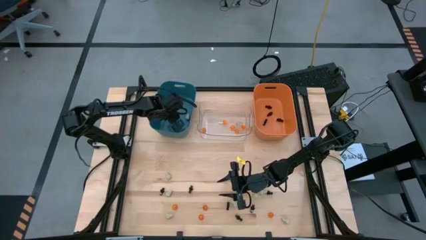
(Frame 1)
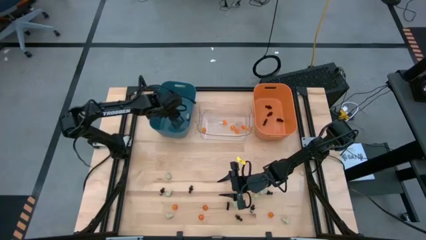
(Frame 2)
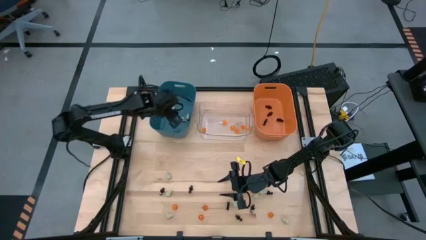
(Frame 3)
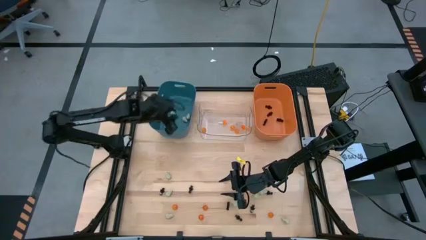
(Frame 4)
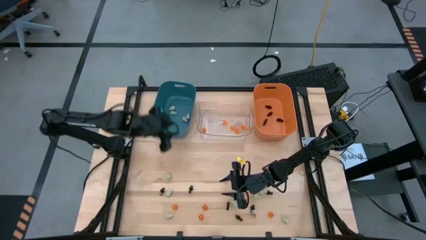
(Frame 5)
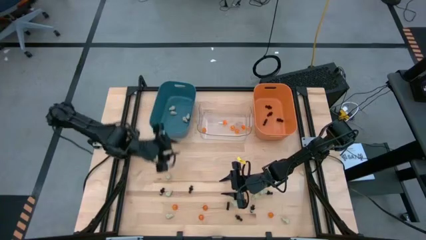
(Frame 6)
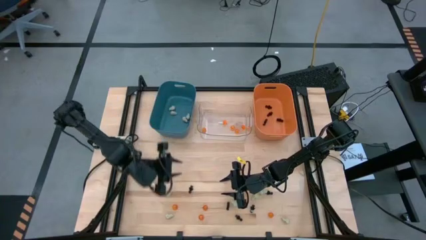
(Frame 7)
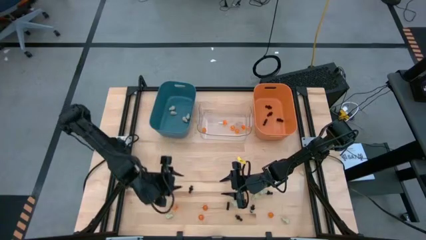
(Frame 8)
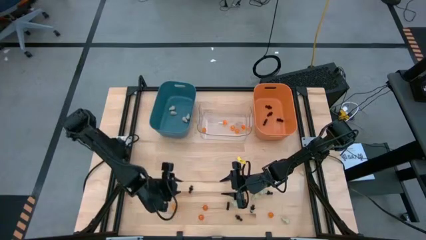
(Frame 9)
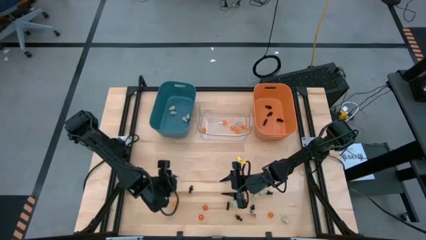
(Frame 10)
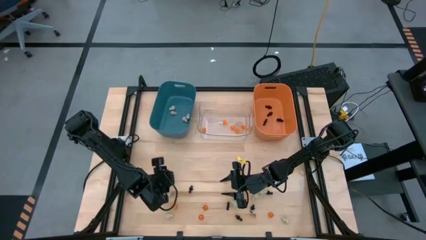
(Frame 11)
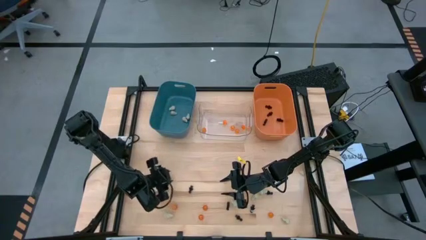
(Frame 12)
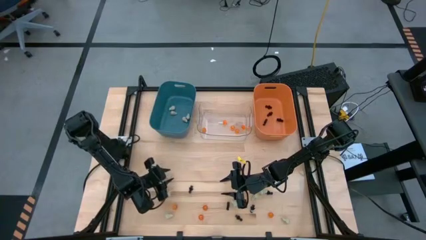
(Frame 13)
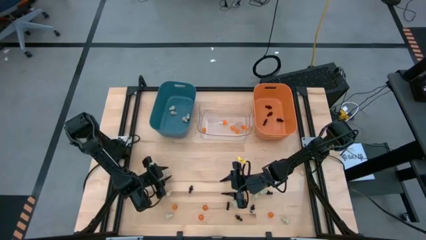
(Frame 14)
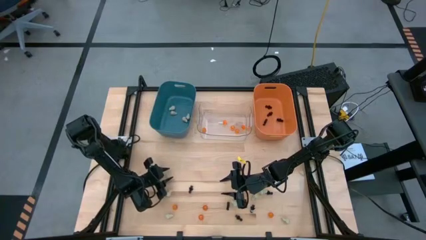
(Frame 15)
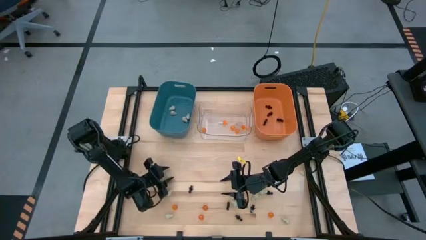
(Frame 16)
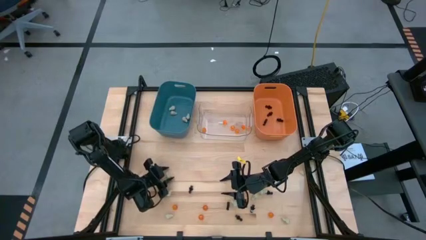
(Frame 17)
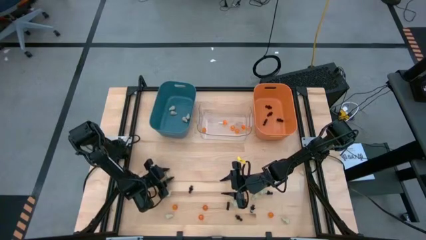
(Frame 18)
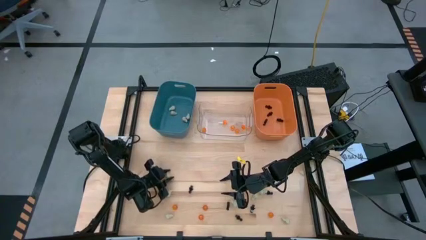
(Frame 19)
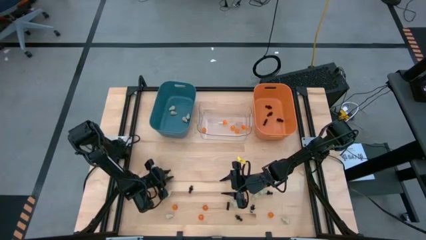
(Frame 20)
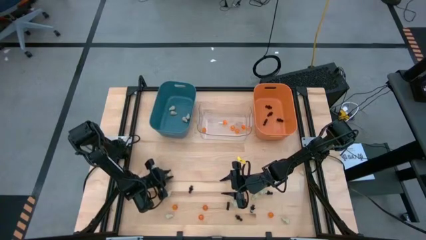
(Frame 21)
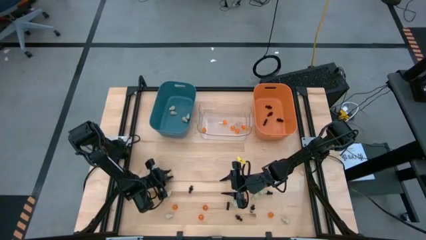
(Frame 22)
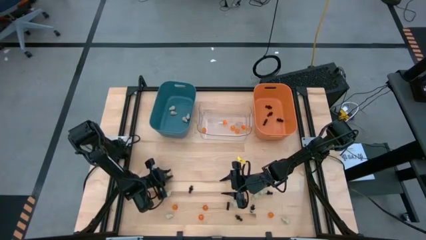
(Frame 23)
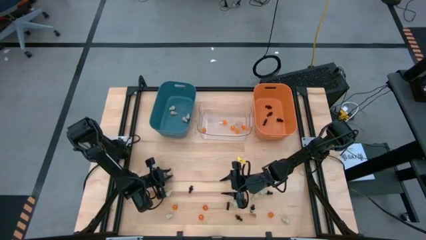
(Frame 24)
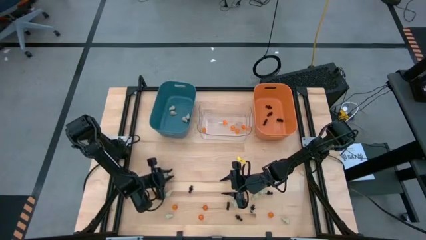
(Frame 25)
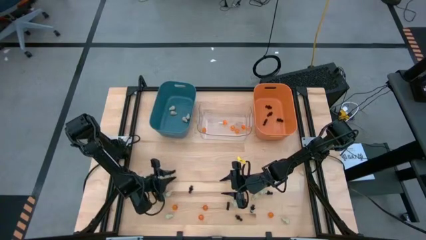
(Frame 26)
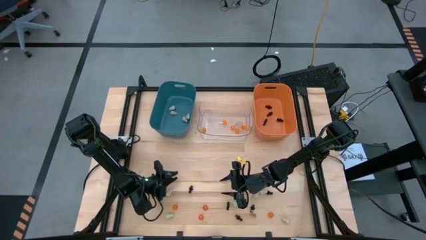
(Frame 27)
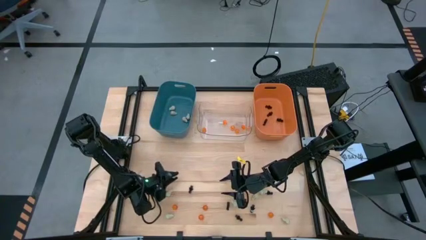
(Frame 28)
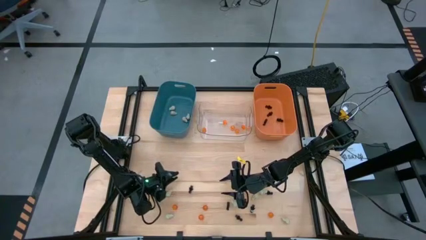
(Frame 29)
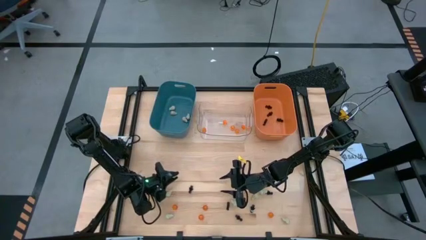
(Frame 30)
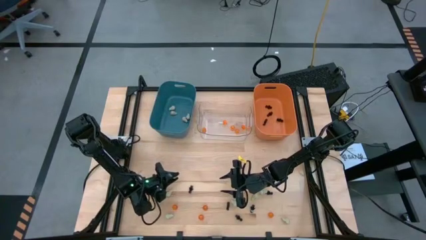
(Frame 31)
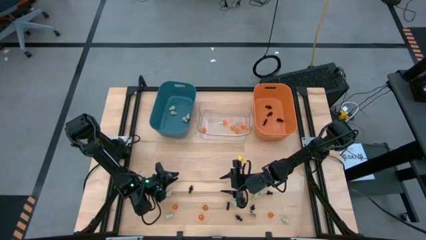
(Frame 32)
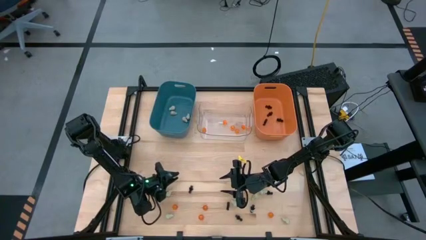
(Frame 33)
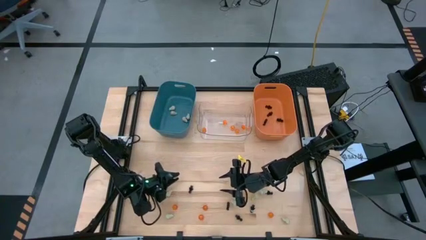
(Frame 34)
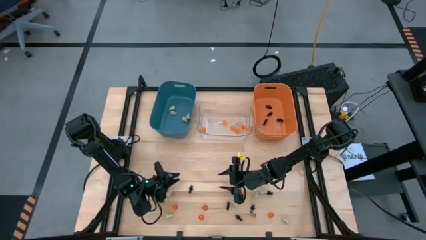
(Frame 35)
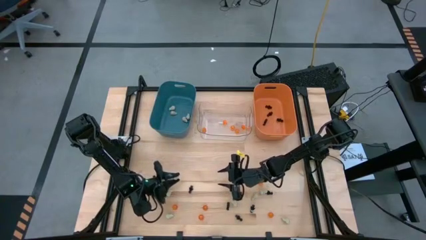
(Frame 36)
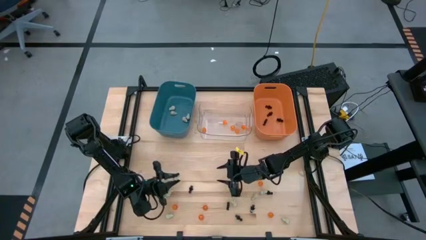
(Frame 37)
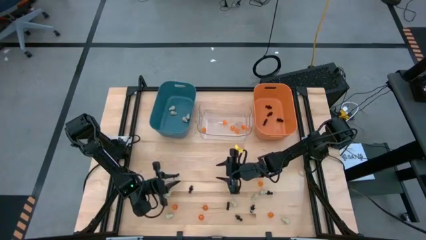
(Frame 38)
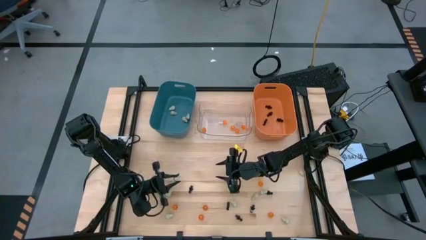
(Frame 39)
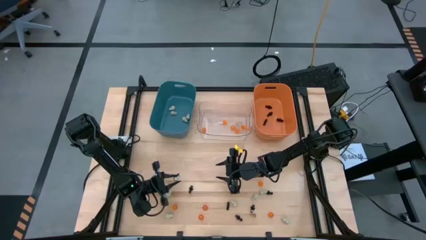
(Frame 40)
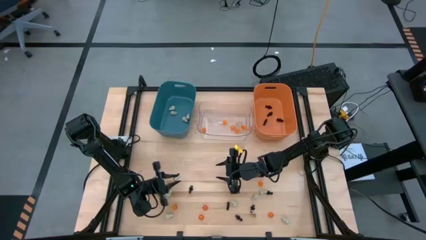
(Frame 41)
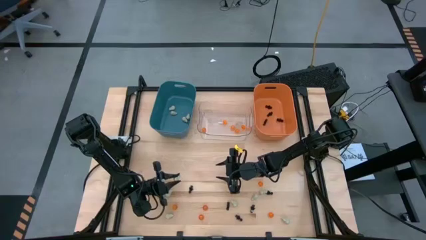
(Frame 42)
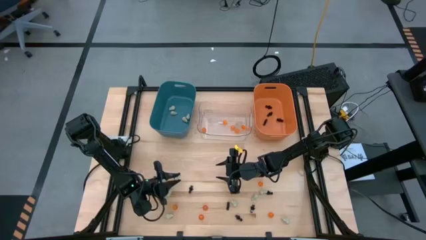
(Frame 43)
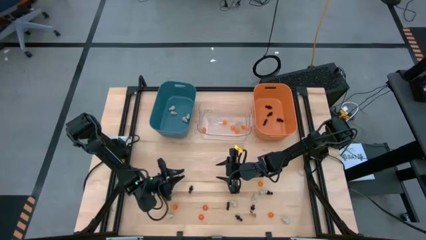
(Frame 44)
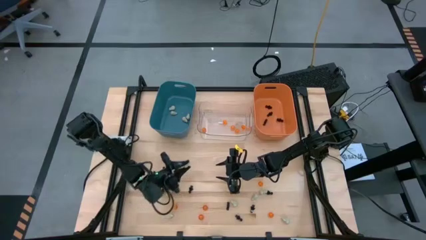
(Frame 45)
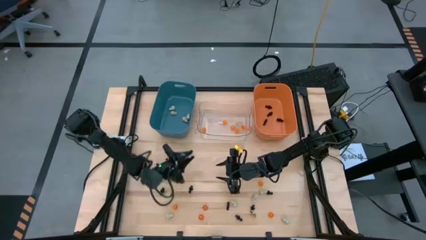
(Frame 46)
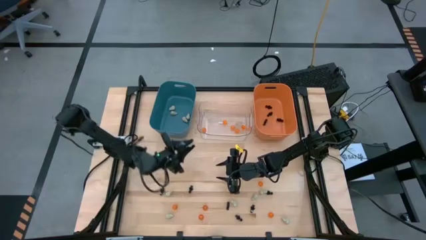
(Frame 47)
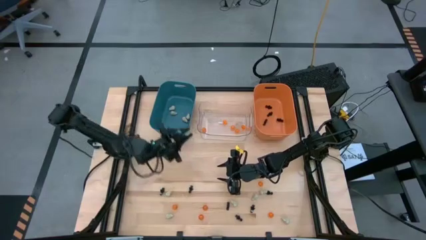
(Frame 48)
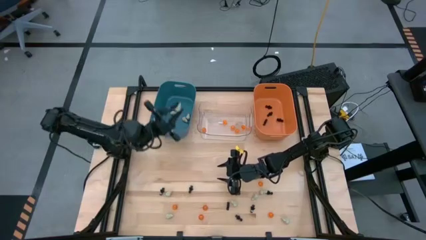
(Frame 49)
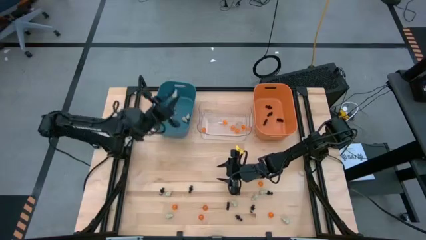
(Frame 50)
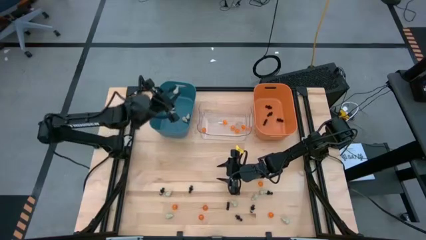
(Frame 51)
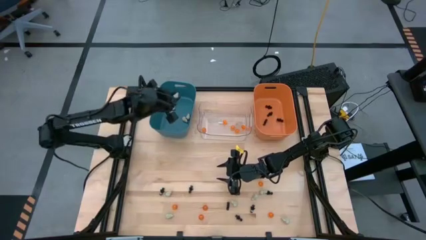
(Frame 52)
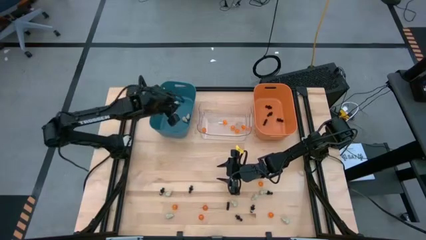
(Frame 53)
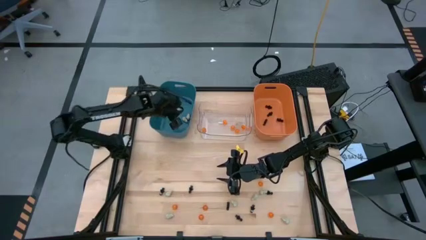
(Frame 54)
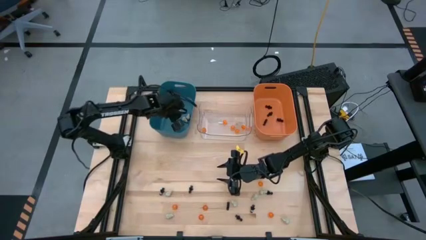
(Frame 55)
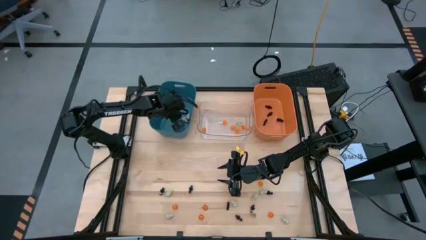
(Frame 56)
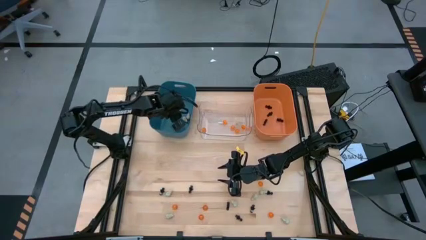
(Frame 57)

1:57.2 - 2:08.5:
Task: Sort Halloween decoration
Put the white skull toy into the blue bin

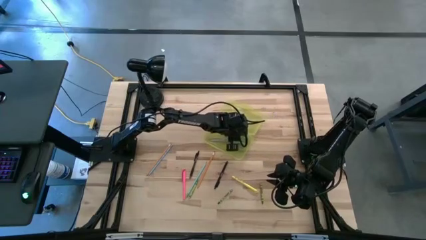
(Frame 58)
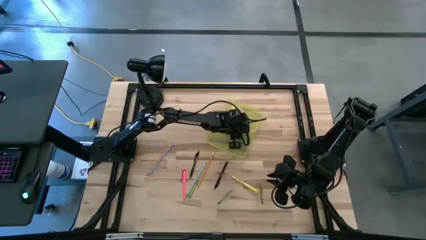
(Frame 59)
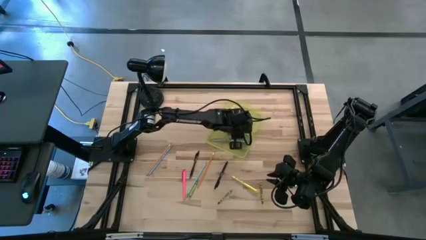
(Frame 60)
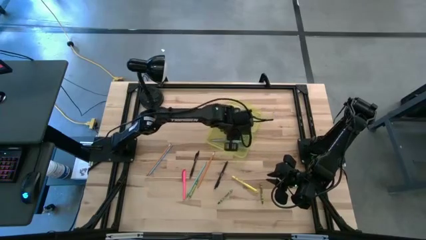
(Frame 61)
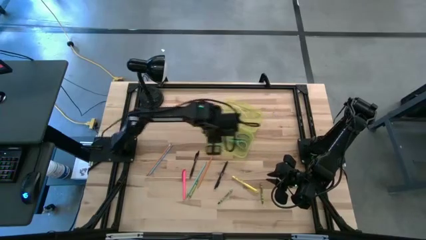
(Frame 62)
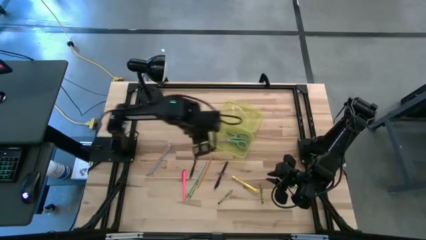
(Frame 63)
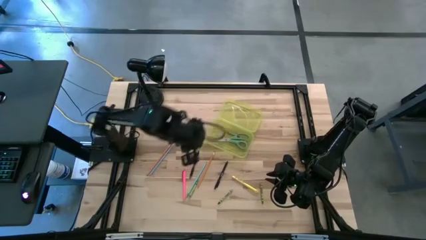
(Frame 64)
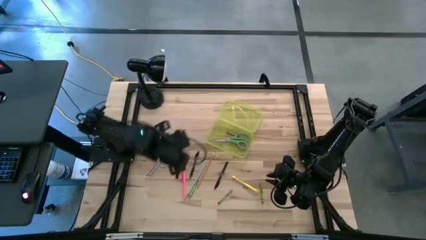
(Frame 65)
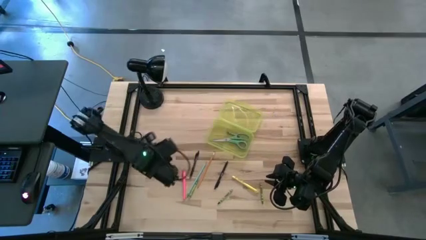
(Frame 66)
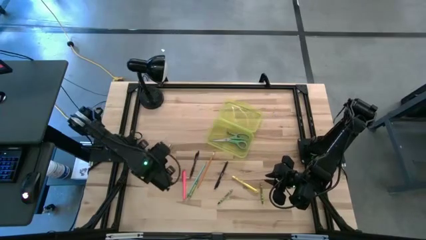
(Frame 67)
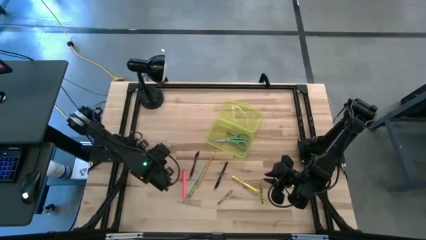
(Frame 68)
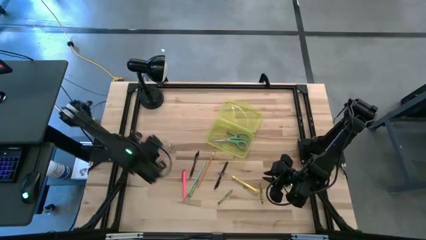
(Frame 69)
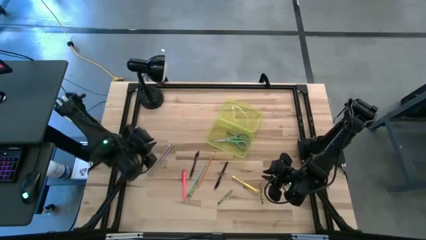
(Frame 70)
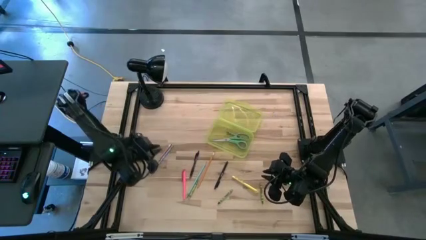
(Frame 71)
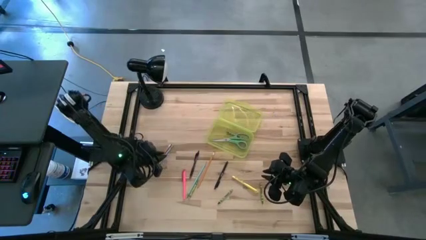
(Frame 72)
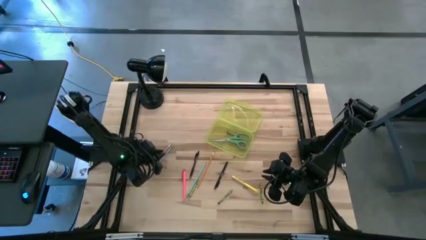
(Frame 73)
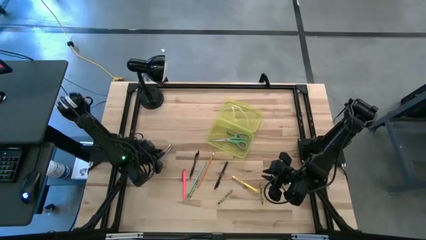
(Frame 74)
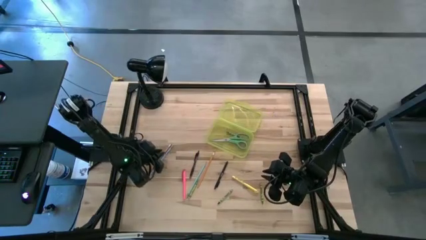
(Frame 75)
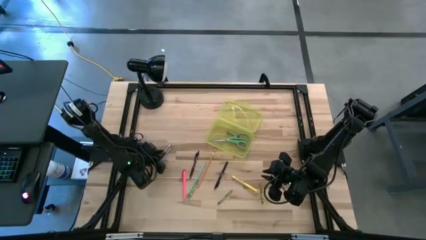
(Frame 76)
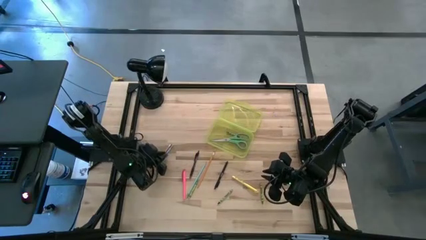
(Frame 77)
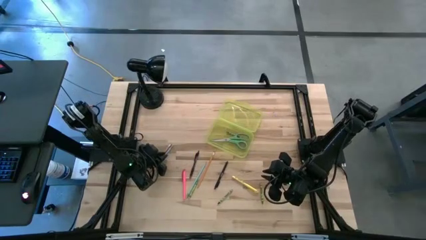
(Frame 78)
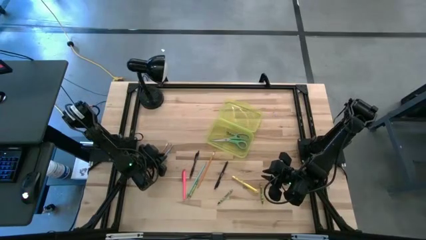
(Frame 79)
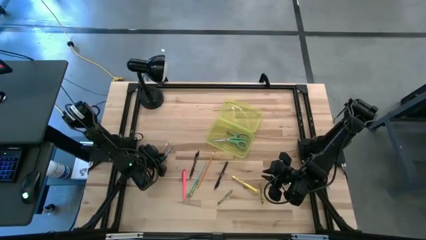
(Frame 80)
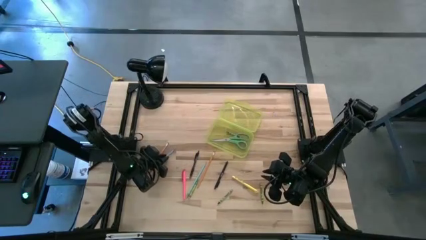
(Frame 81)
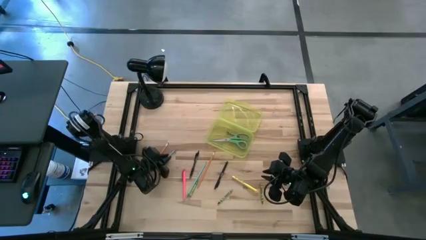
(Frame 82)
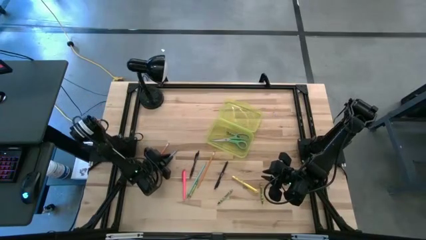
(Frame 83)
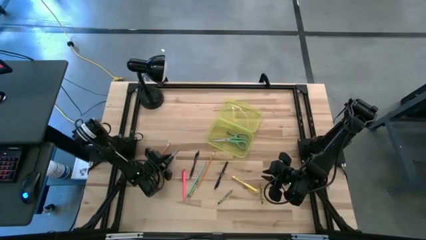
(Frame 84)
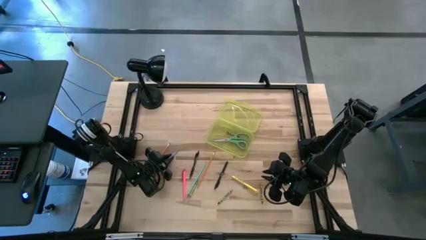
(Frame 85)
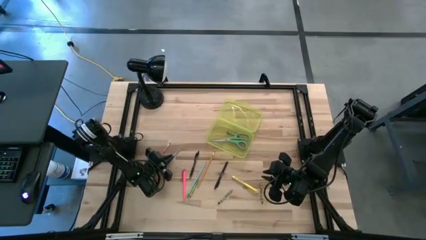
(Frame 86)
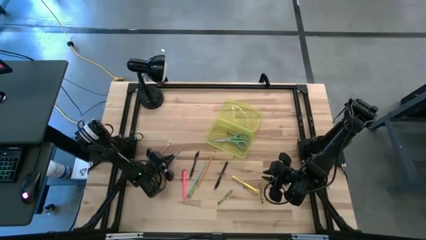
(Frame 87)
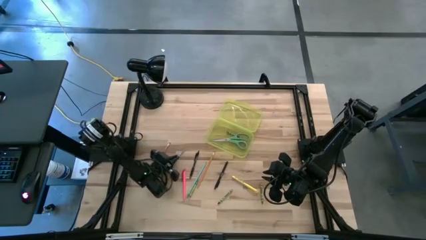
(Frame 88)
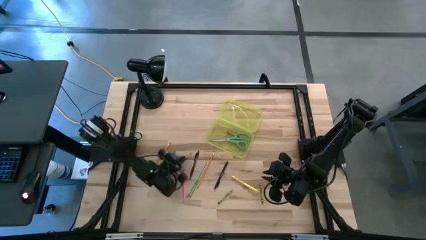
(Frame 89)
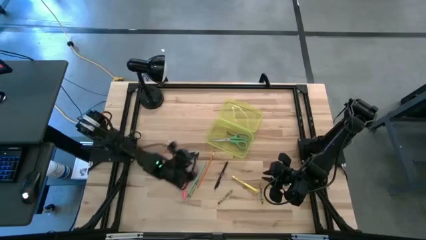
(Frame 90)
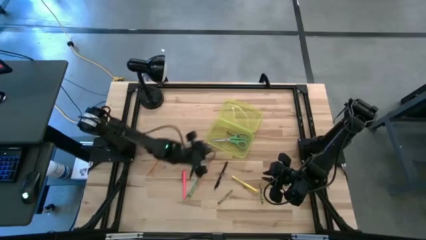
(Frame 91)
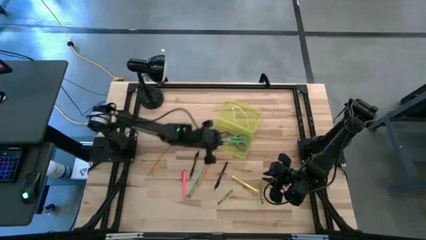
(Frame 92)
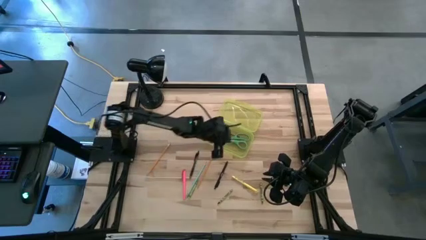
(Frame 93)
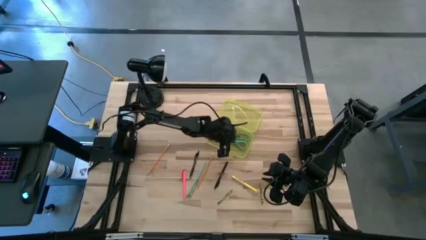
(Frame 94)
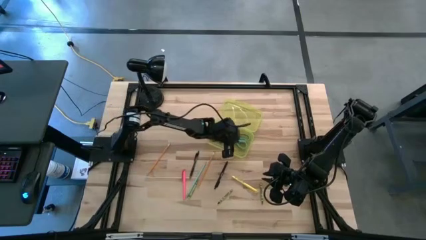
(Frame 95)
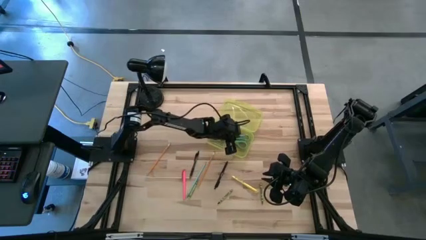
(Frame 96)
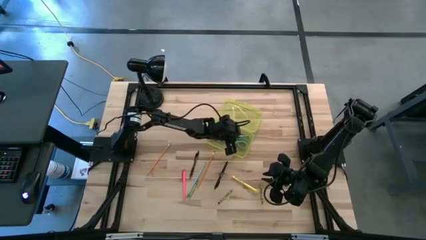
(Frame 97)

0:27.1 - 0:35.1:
Task: Pick & place school supplies into a supply box
Put the top blue pencil into the yellow supply box
